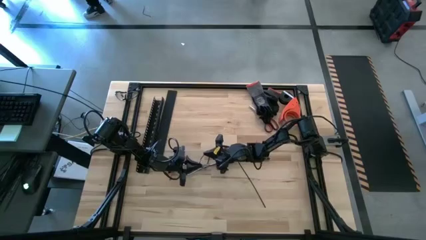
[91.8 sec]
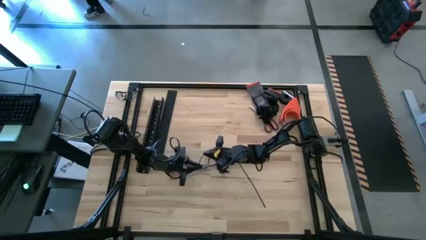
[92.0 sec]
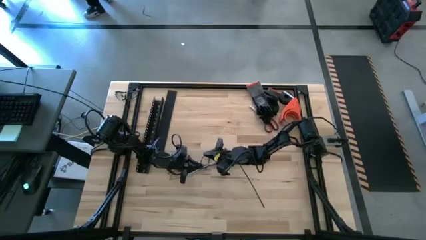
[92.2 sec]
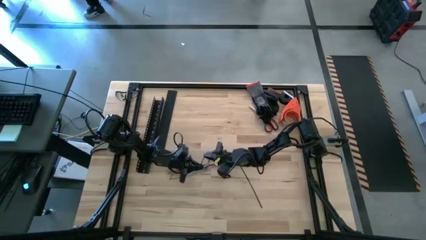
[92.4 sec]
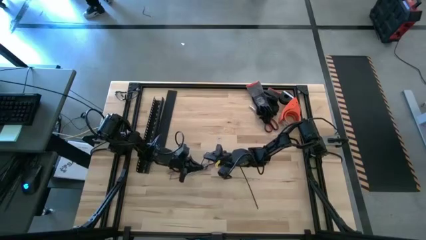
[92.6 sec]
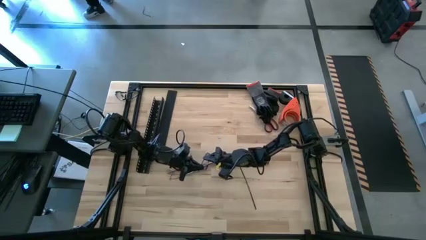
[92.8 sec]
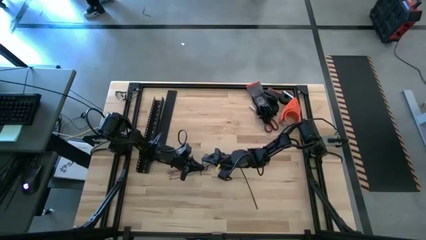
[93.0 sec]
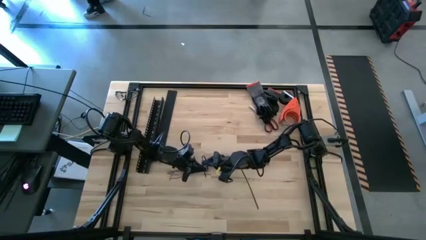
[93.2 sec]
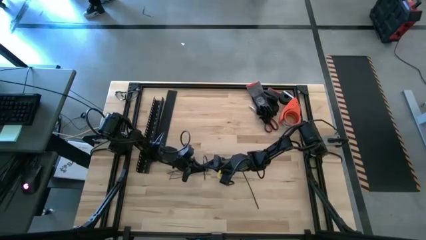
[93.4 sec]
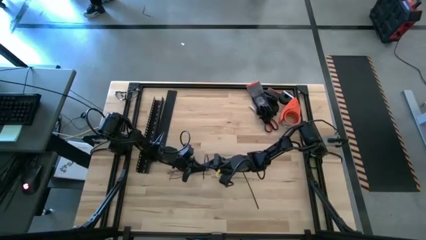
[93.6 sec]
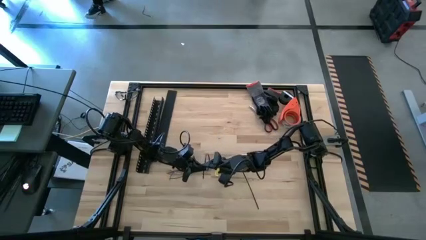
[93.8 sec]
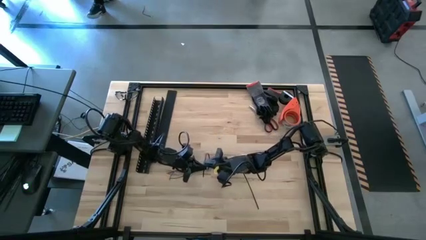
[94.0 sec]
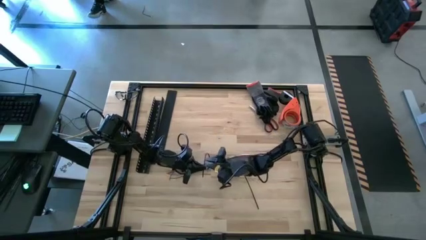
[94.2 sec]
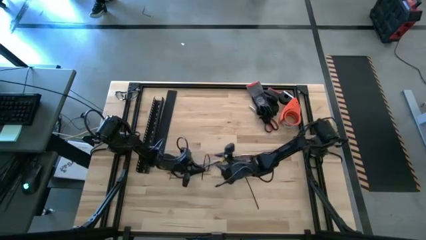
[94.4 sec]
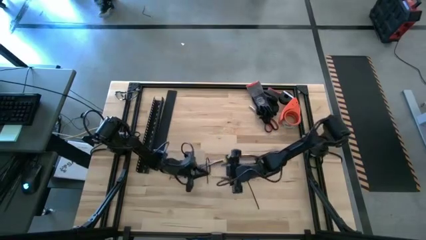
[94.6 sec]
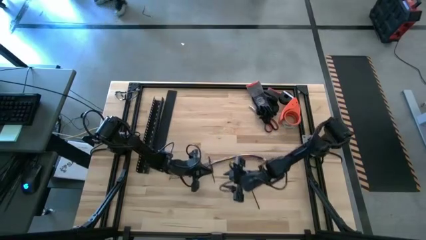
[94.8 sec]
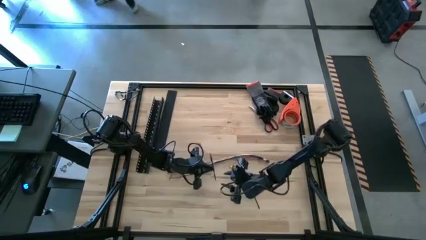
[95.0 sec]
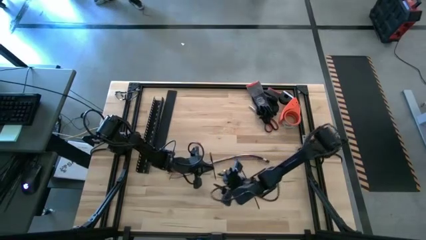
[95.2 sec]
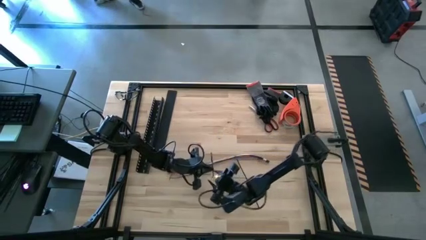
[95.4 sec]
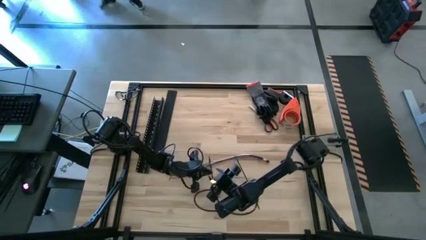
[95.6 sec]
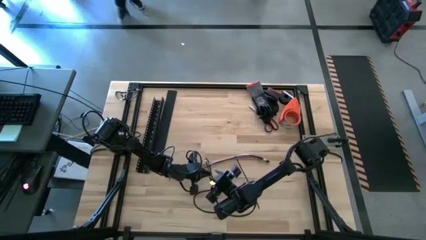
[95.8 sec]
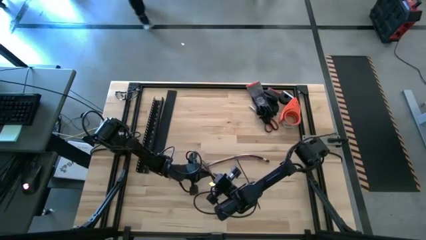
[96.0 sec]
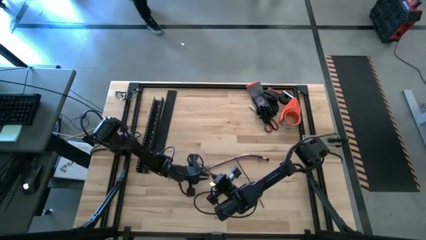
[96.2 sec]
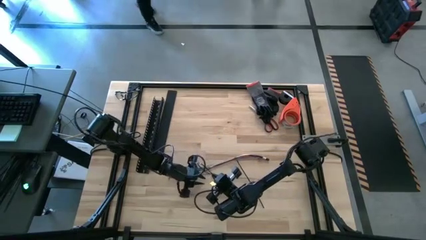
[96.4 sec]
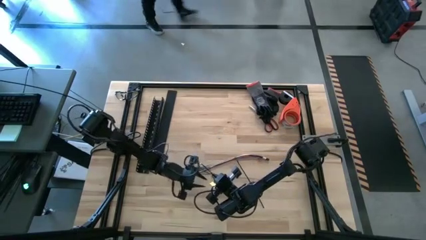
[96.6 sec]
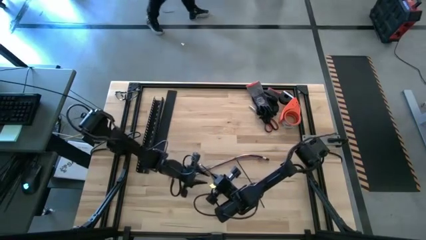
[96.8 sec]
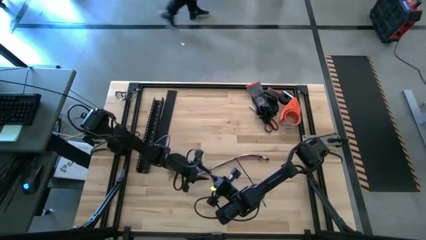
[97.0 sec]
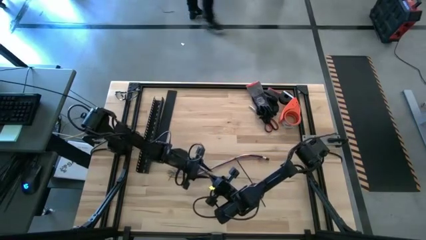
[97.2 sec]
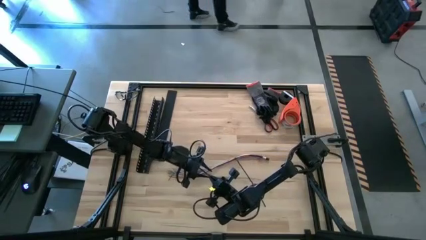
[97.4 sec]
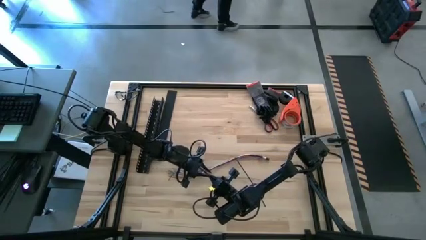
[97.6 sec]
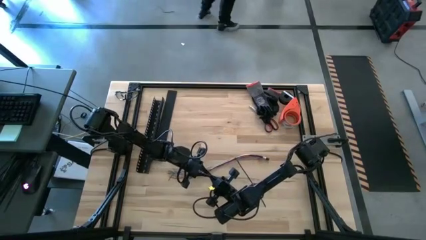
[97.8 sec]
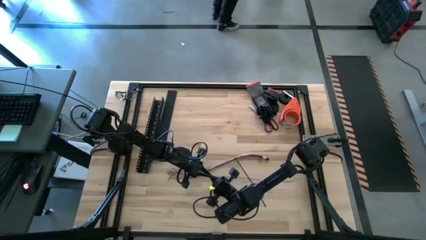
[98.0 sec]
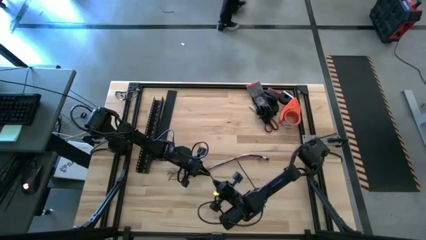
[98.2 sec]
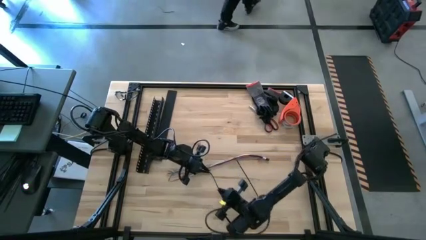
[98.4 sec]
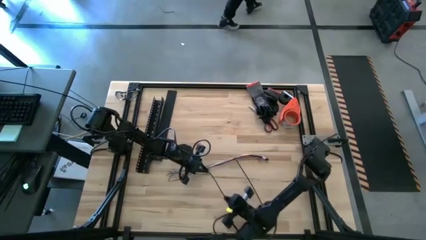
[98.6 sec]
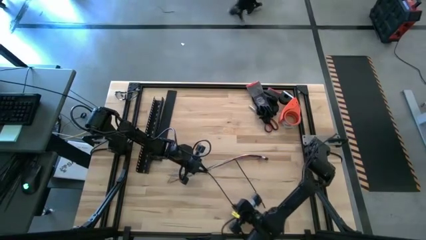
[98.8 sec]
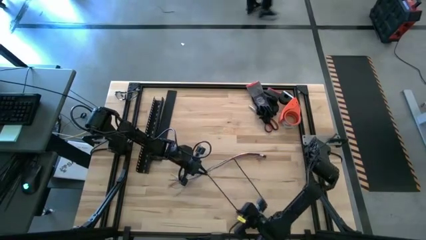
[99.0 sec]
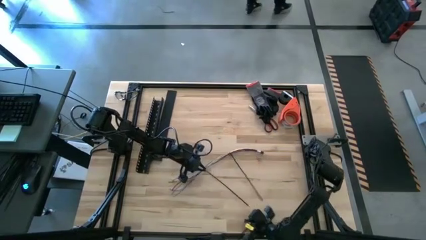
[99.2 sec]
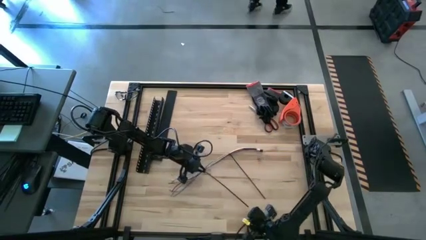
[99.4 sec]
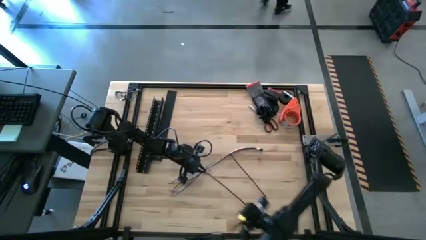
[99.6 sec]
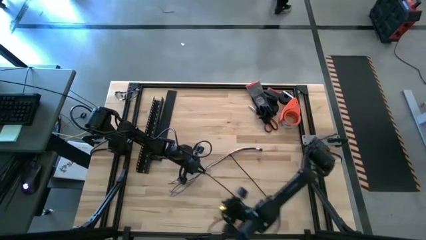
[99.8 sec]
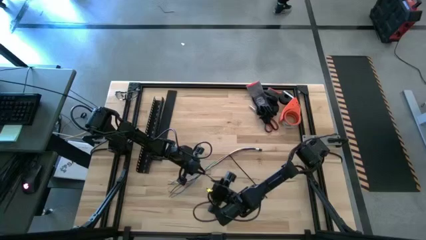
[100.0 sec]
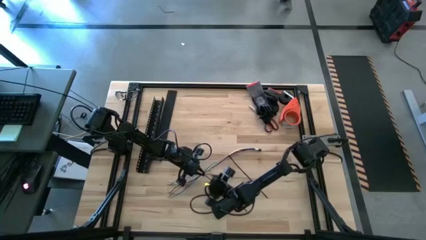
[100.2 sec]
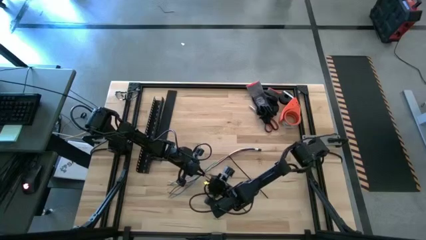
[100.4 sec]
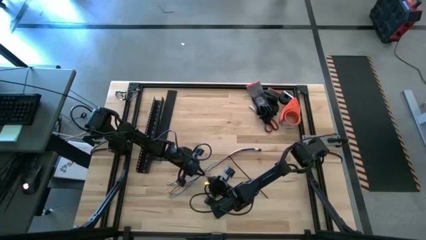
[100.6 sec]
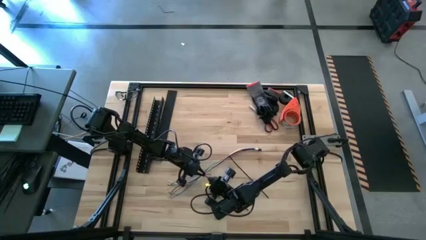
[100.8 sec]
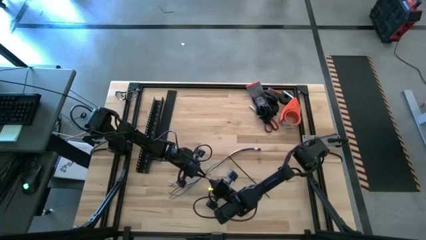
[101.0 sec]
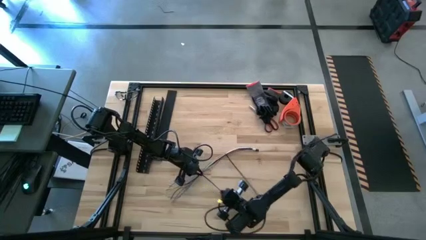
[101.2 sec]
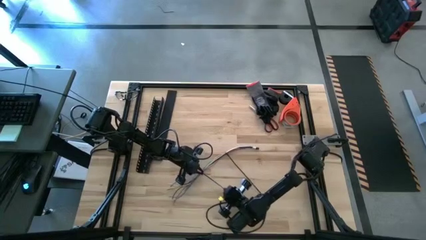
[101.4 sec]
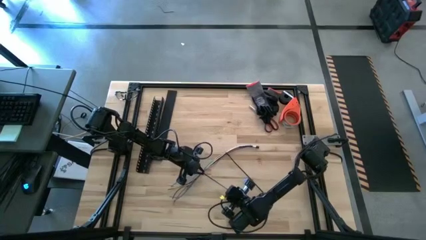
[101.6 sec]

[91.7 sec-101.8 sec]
Task: Ziptie cables
Wrap the cables together using the black zip tie
